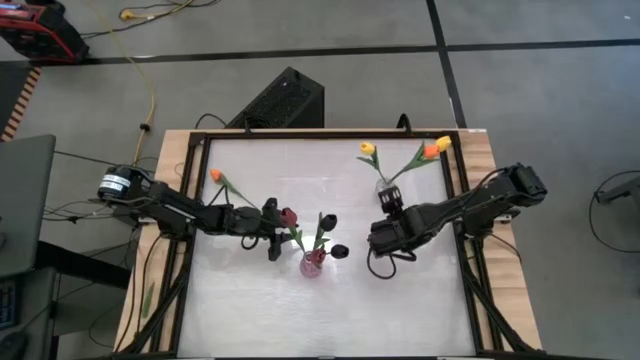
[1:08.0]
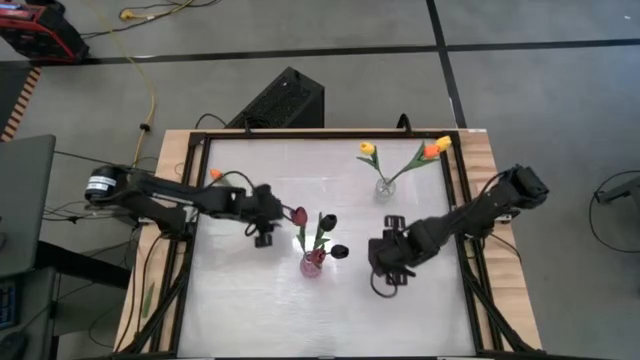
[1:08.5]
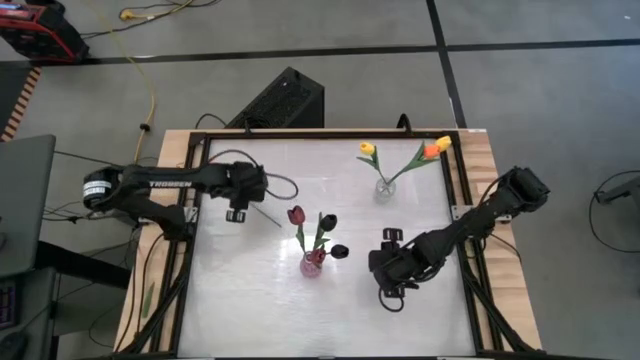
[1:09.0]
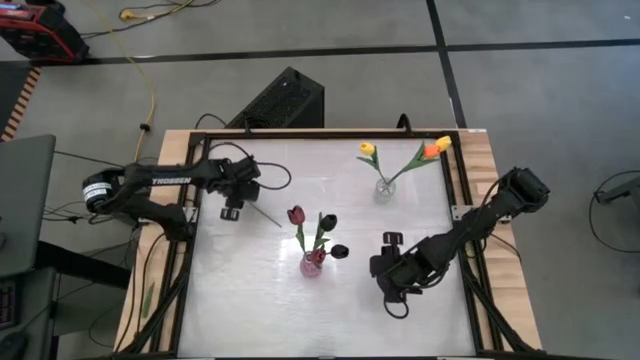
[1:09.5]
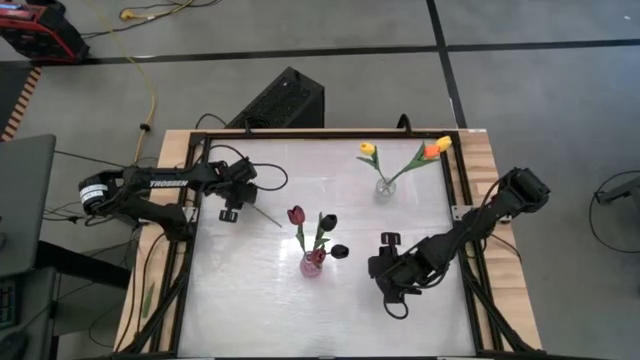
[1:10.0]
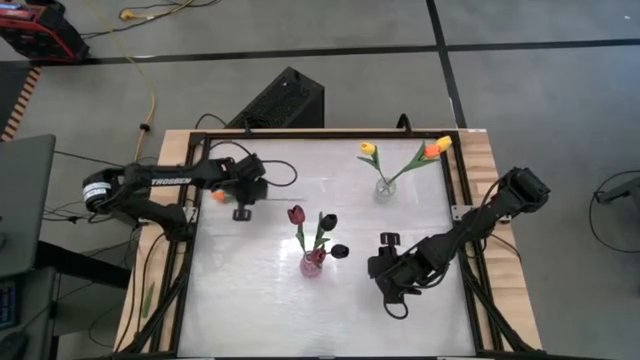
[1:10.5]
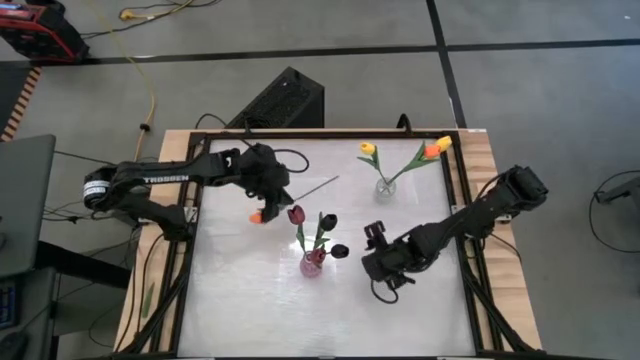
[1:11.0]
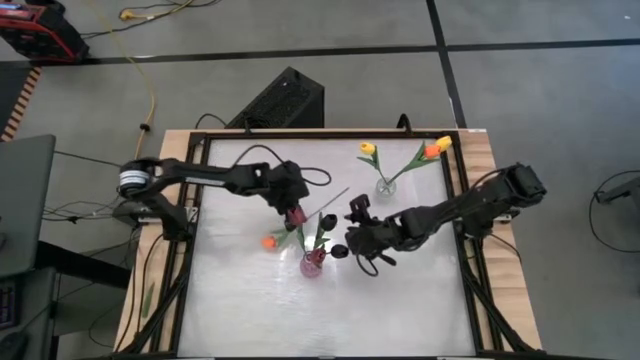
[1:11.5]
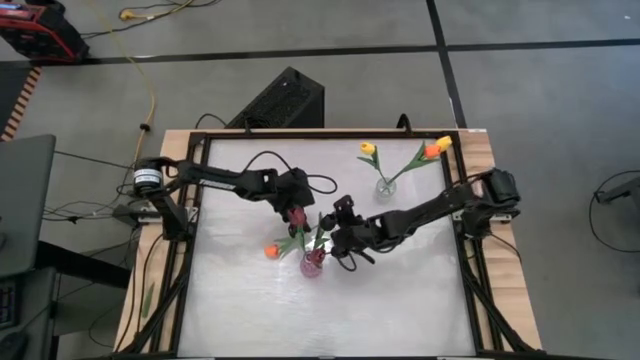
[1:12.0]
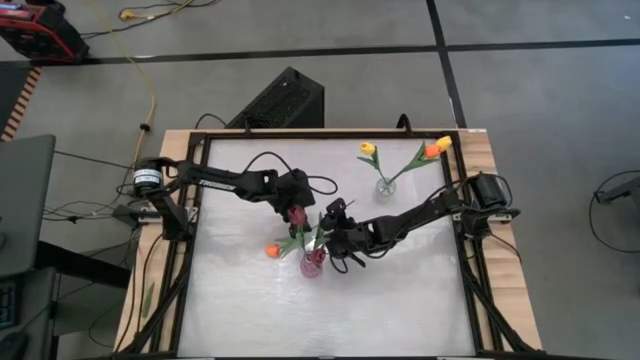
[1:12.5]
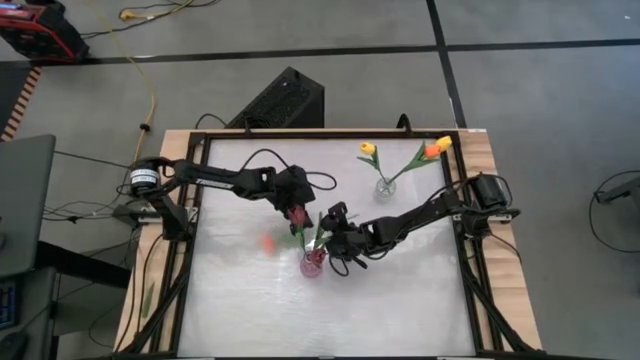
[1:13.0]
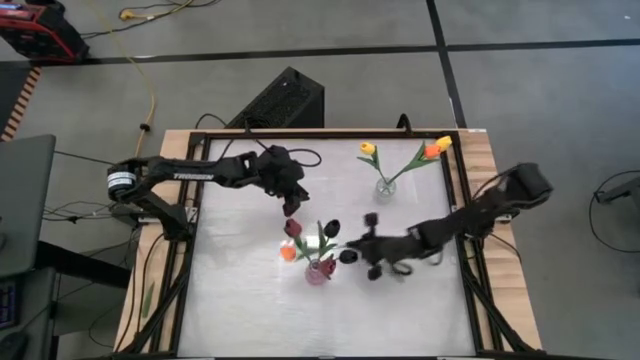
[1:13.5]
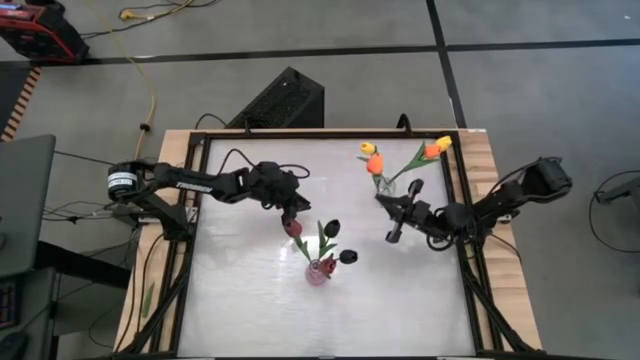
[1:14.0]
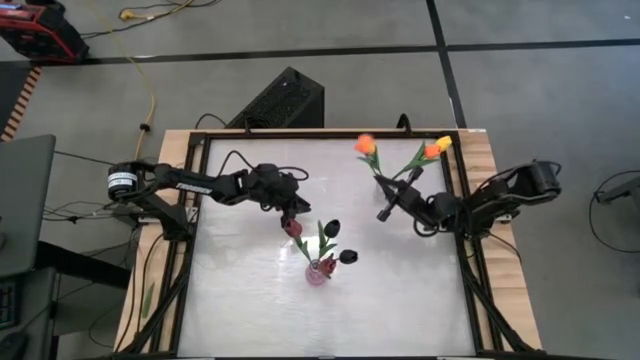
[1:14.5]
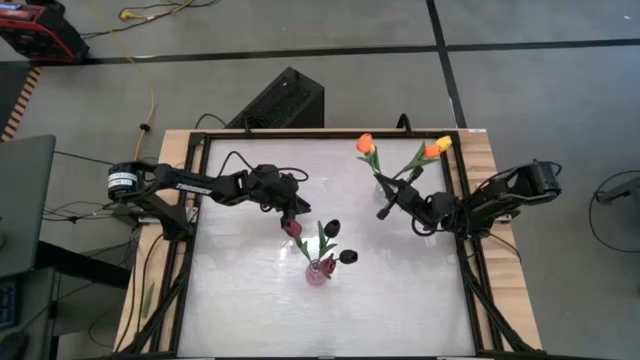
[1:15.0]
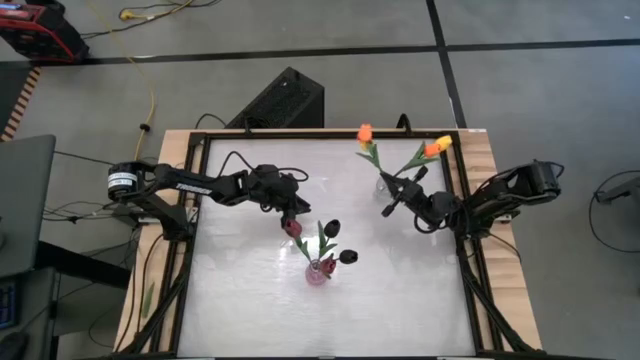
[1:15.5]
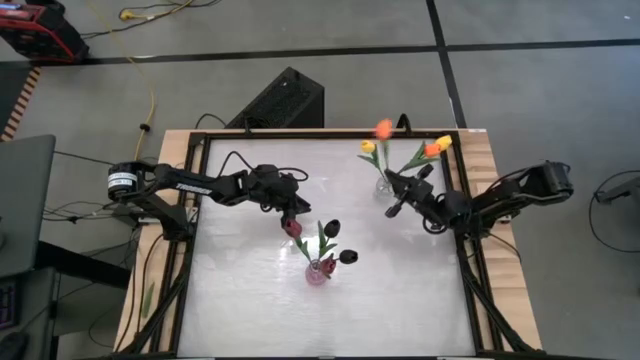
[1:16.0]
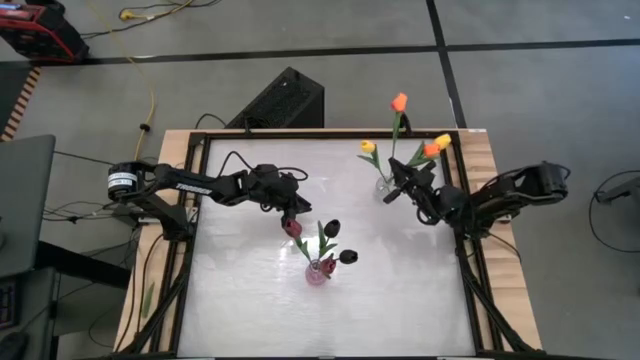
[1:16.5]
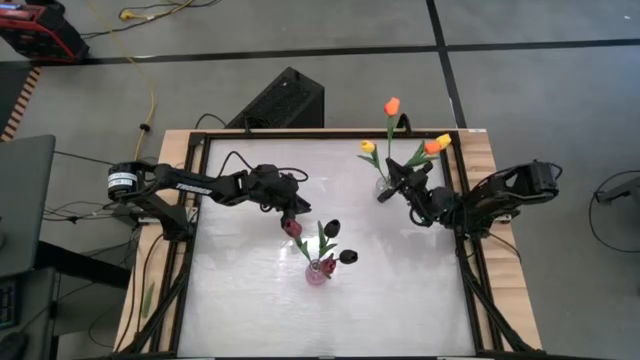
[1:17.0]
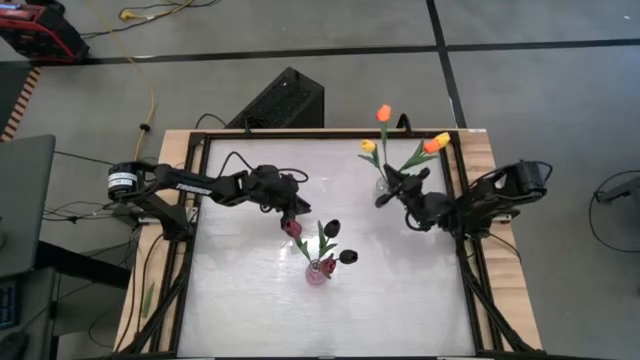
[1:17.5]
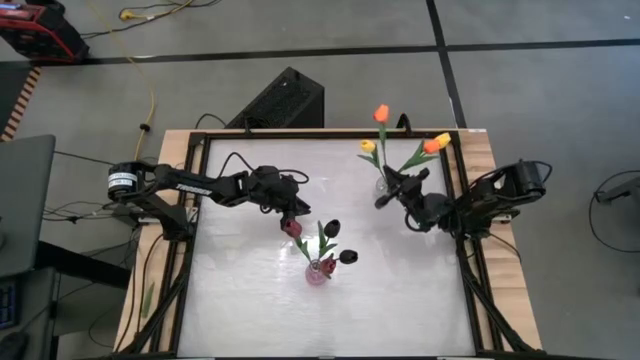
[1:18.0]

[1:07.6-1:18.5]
Task: Sort flowers into vase by color
Put the orange flower into the transparent vase

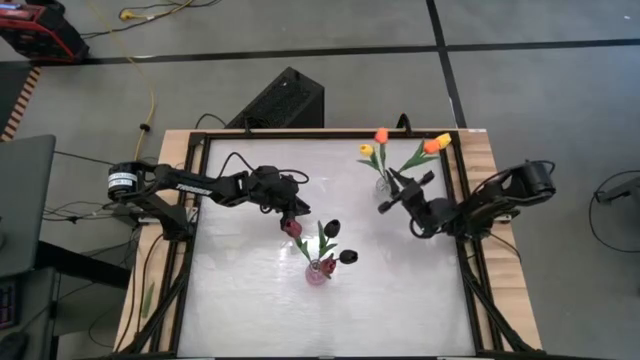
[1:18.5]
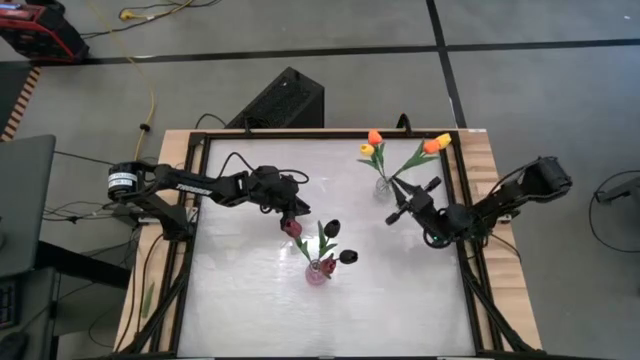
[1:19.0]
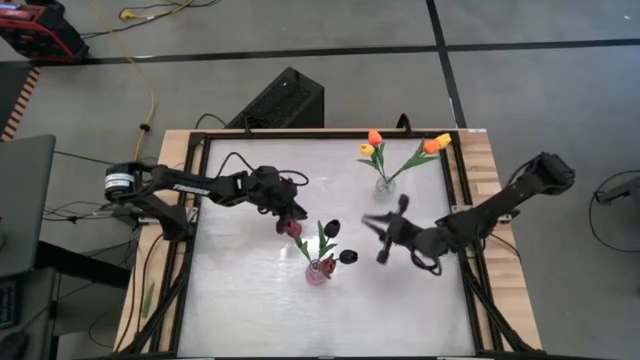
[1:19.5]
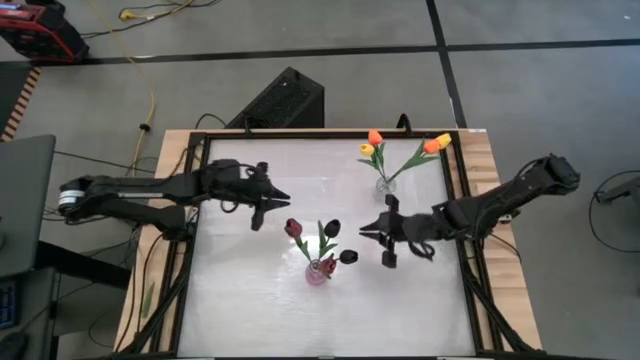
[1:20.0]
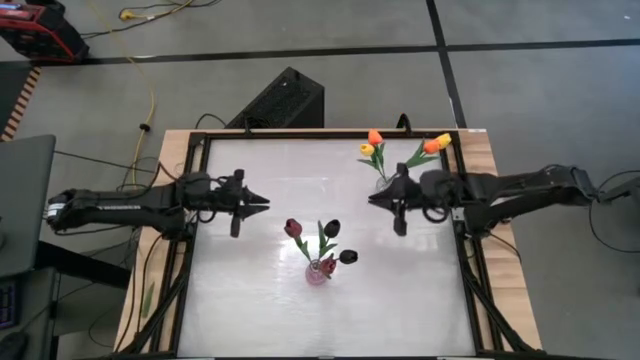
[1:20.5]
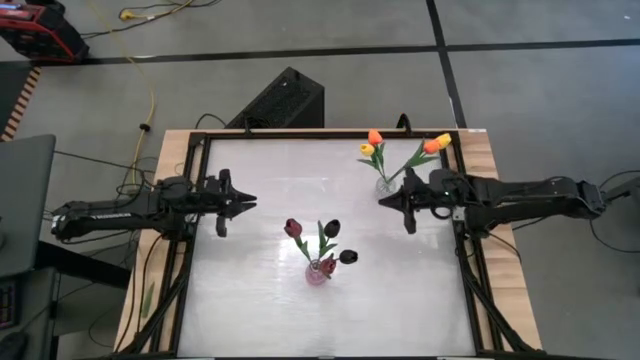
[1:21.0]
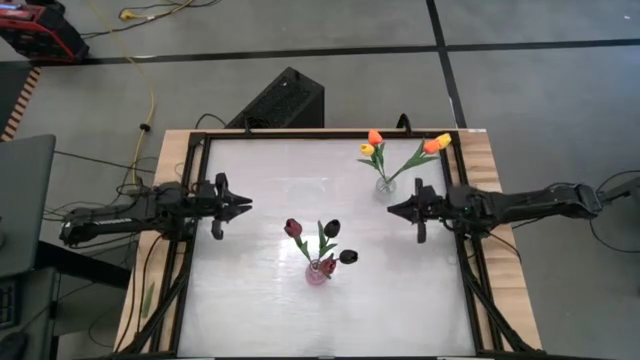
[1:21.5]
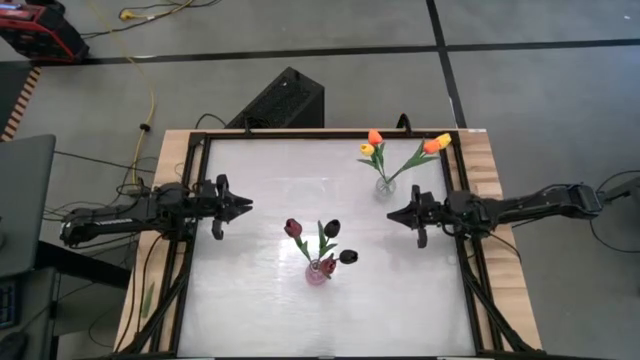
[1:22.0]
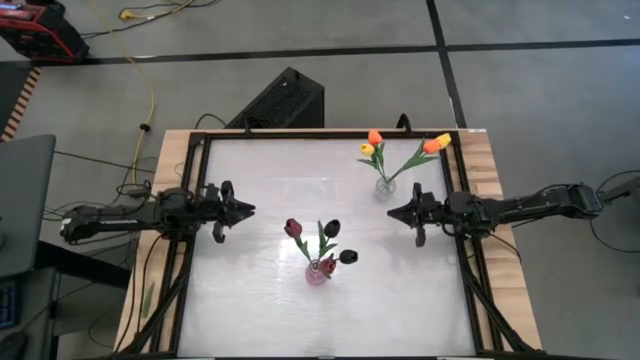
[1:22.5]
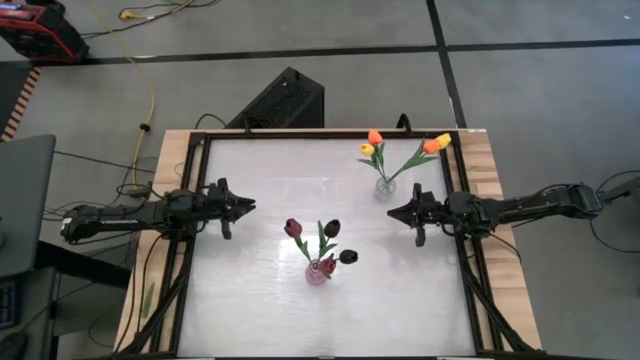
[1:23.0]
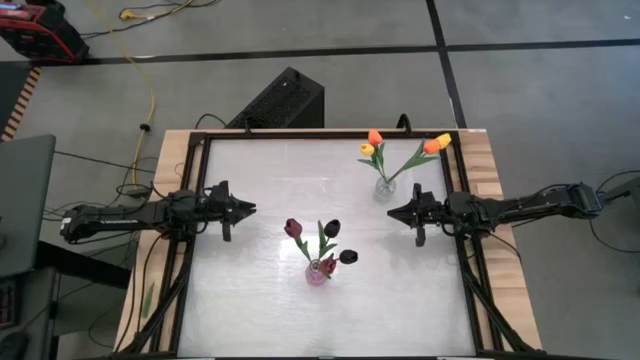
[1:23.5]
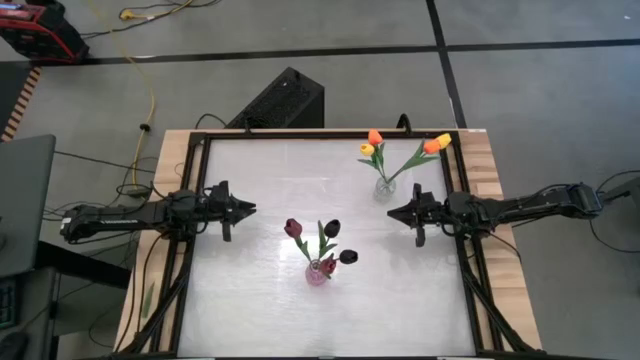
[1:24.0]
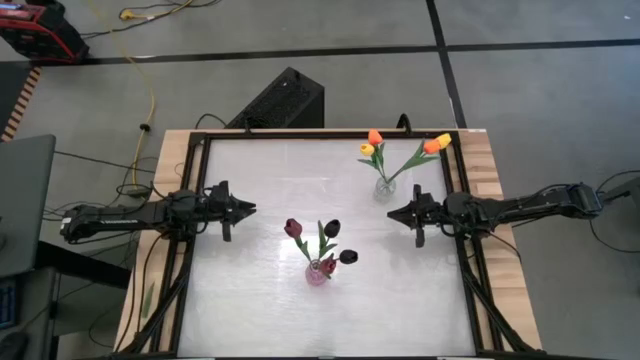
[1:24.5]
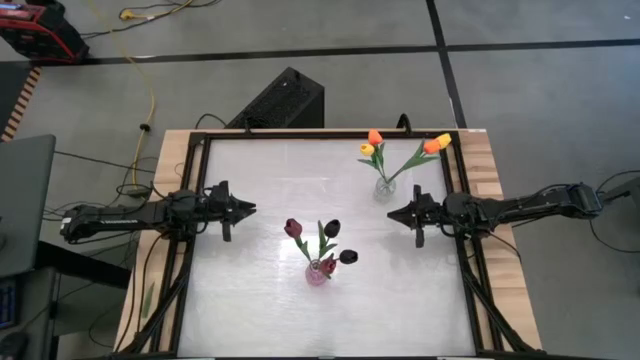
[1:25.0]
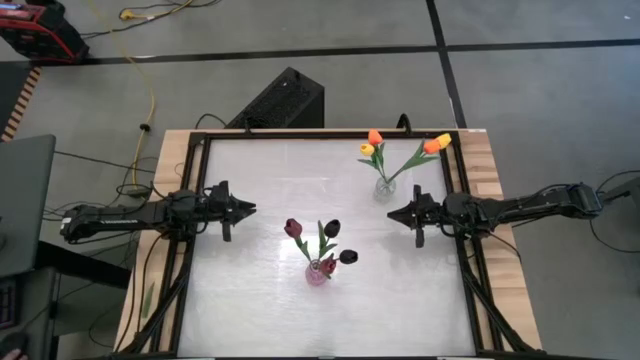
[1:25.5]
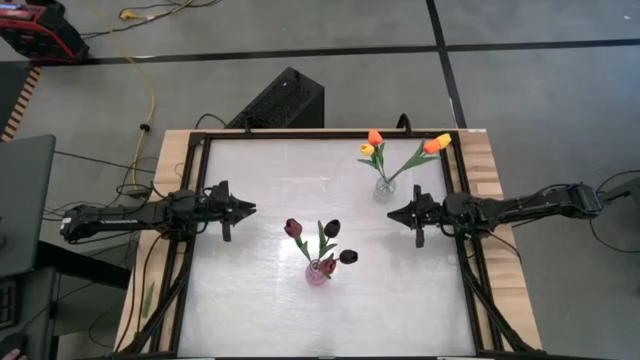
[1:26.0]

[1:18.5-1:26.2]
Return to Home Position

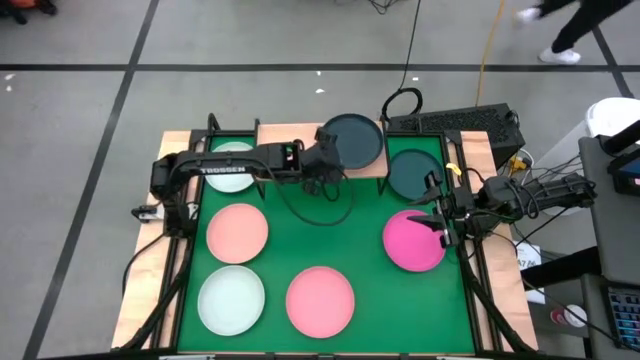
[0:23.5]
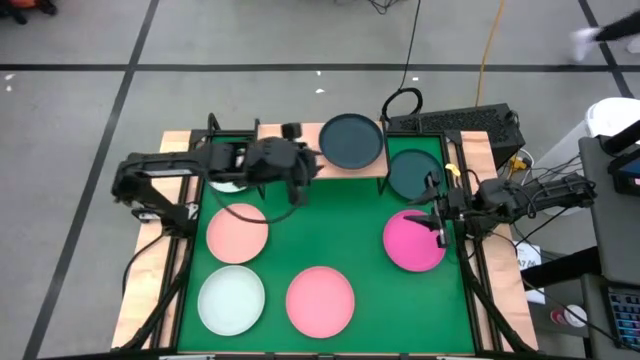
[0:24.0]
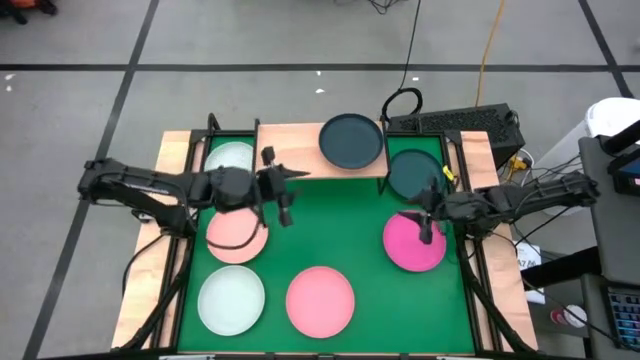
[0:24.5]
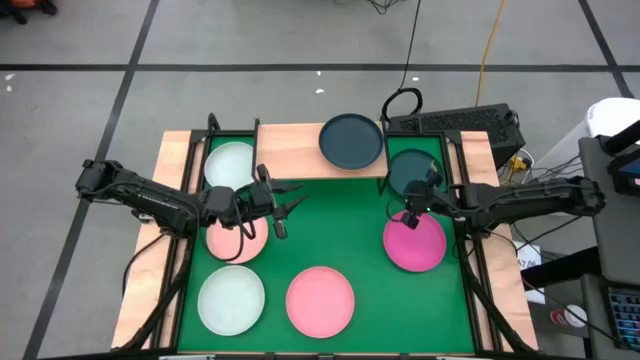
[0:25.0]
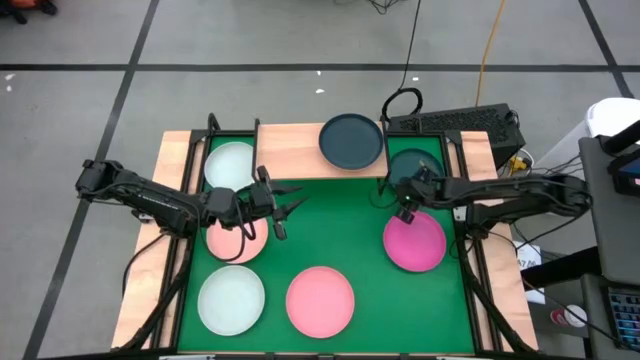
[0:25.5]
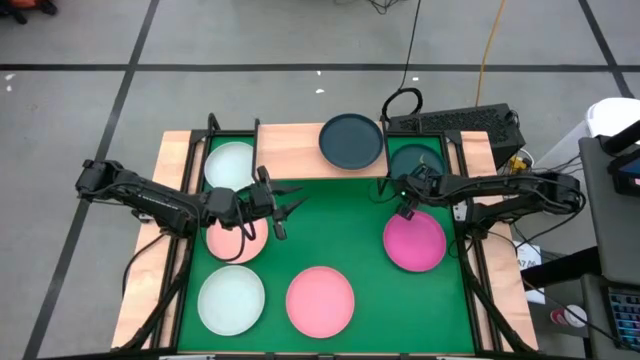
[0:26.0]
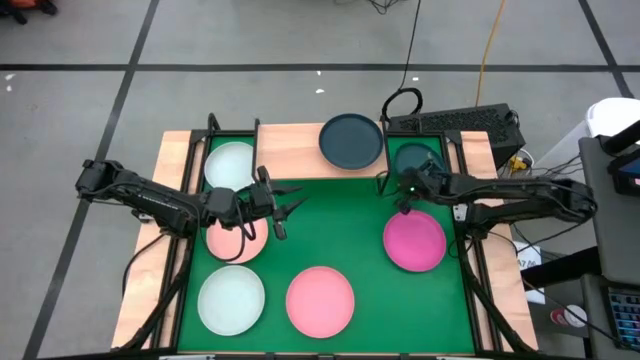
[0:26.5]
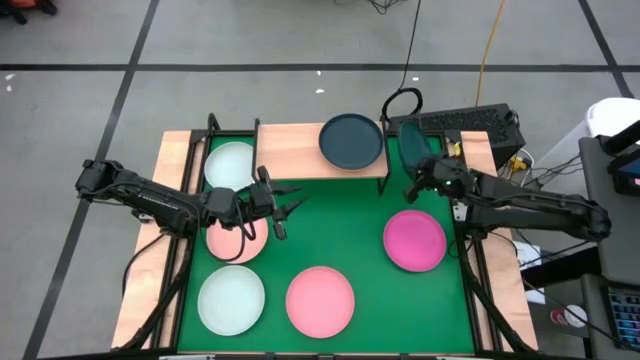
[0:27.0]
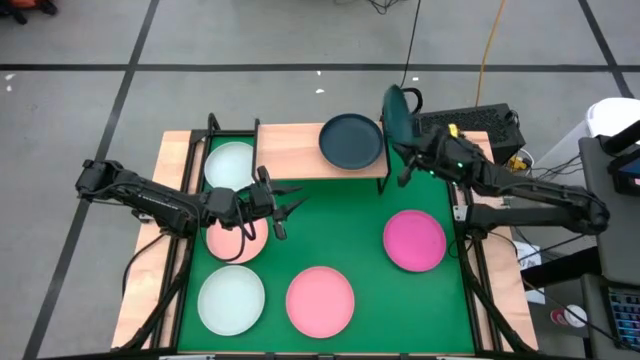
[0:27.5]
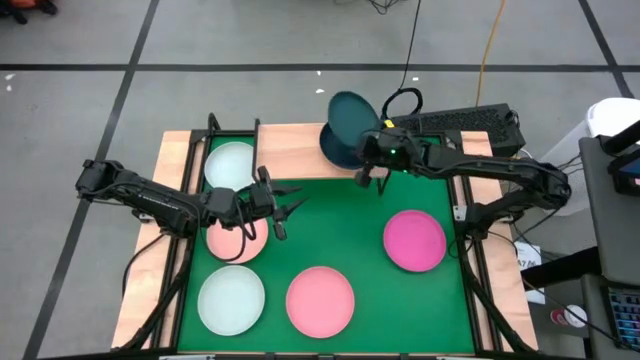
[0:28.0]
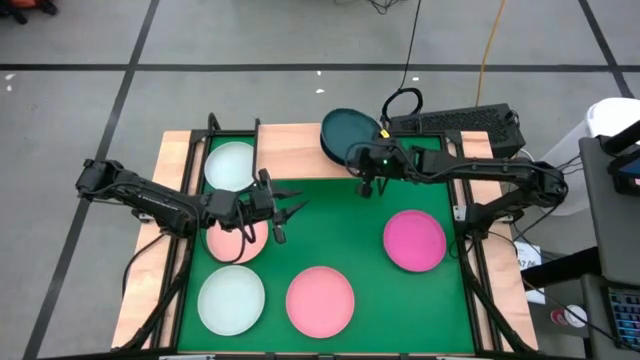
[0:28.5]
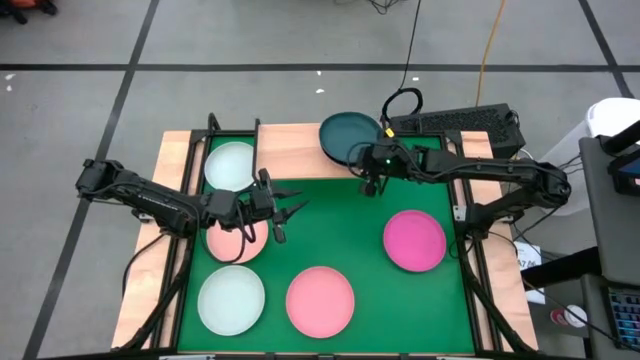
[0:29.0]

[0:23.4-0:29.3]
Task: Place and stack plates onto a shelf
Stack the green plate on top of the black plate on the shelf
